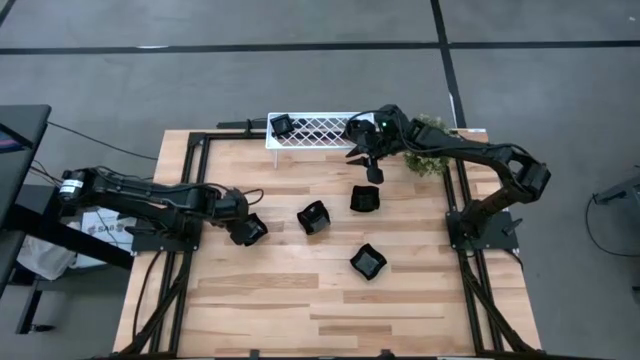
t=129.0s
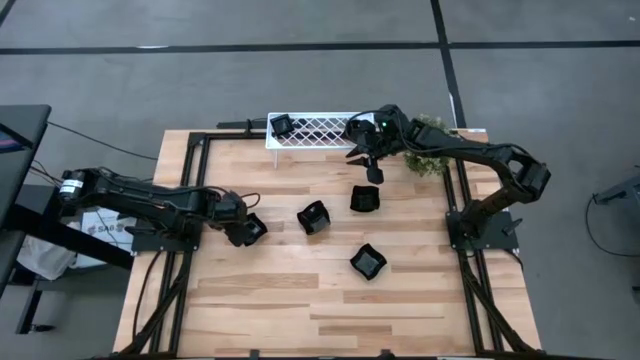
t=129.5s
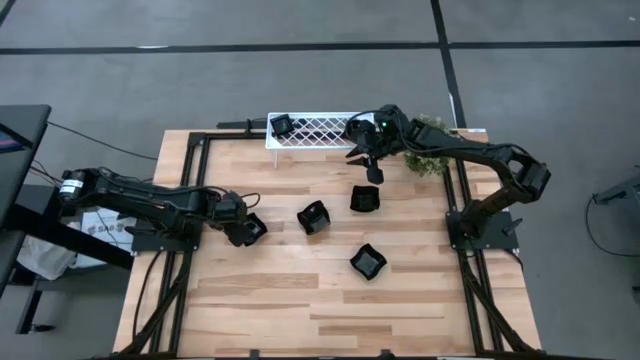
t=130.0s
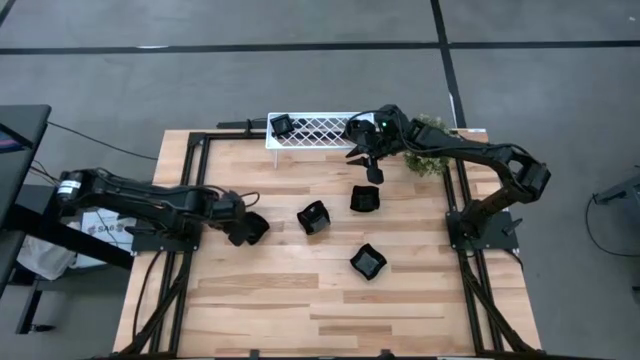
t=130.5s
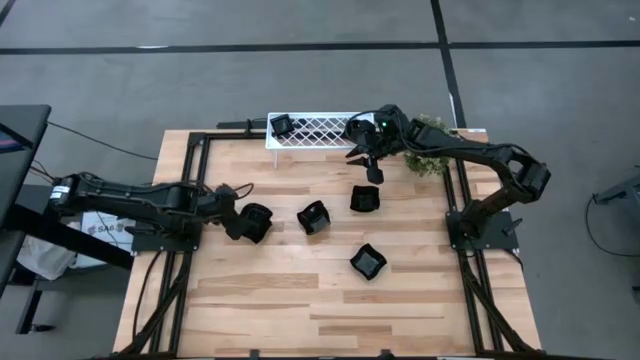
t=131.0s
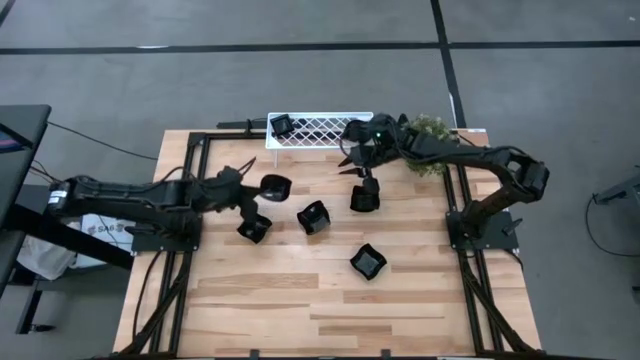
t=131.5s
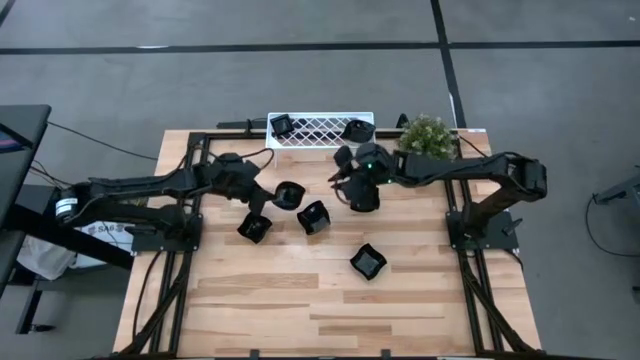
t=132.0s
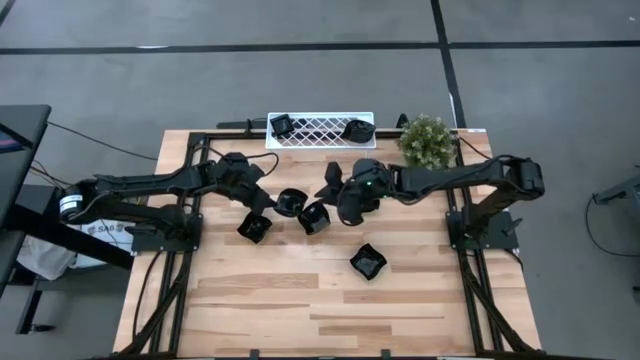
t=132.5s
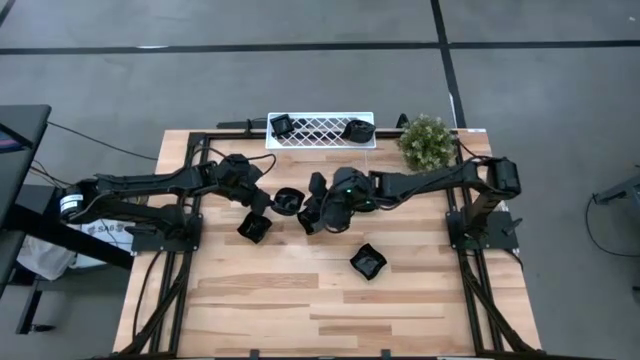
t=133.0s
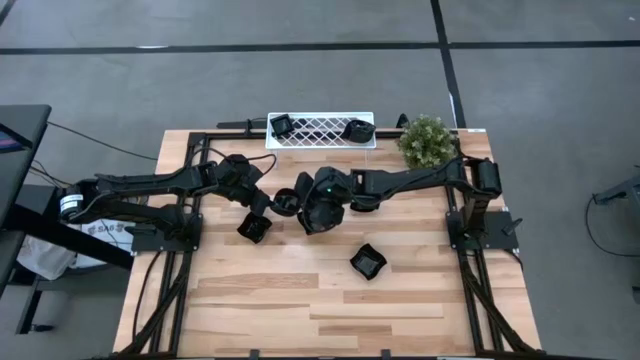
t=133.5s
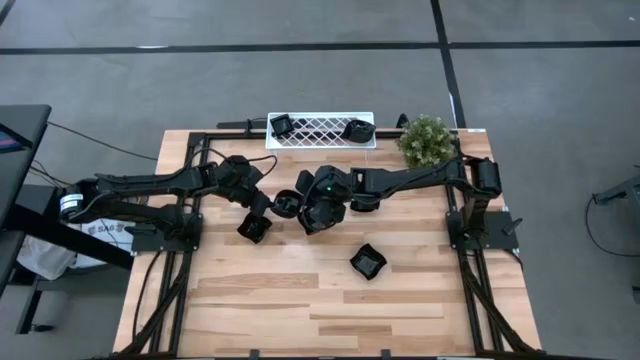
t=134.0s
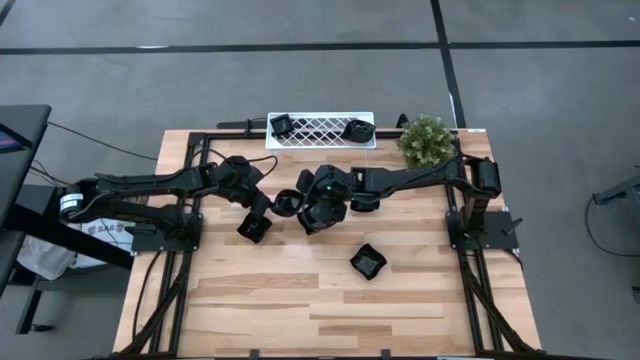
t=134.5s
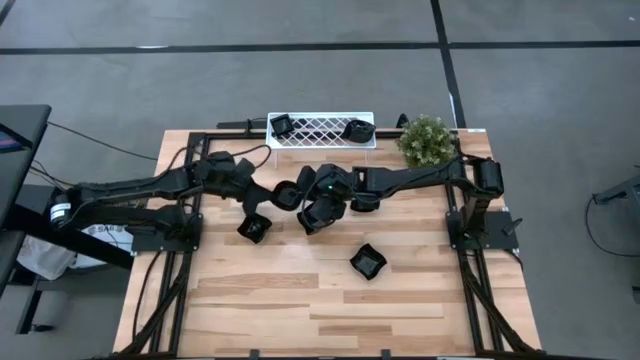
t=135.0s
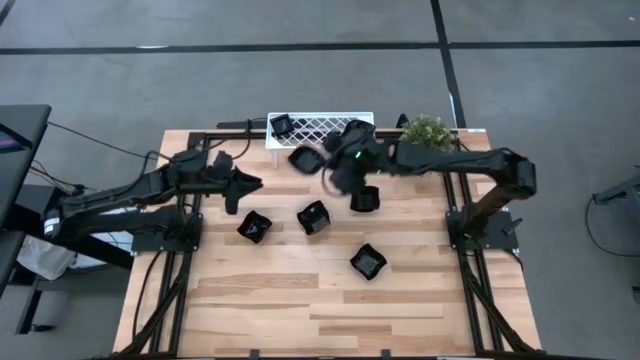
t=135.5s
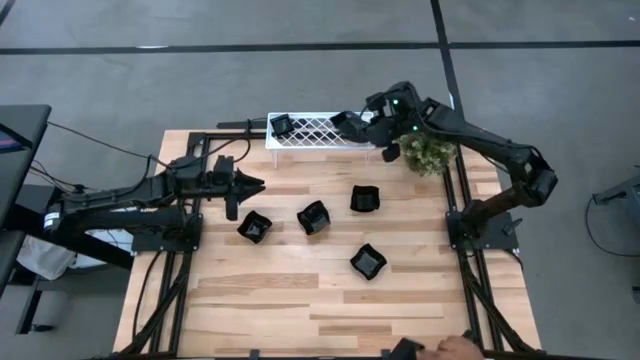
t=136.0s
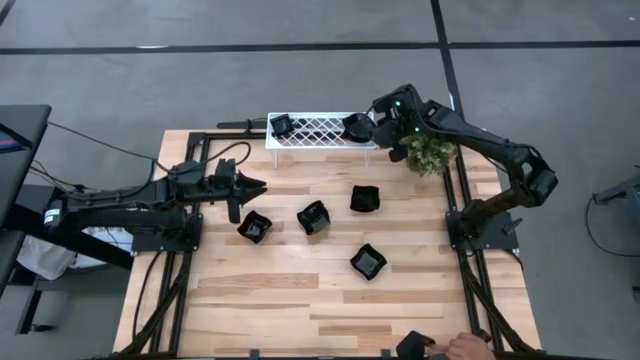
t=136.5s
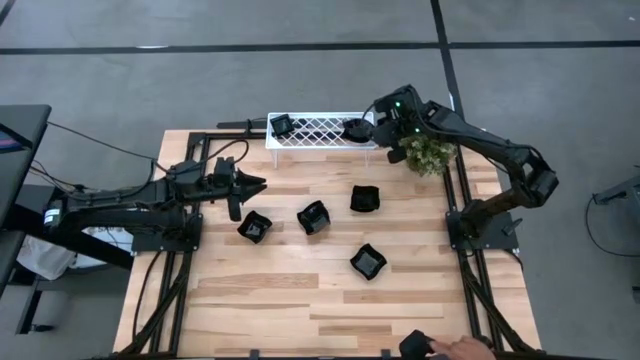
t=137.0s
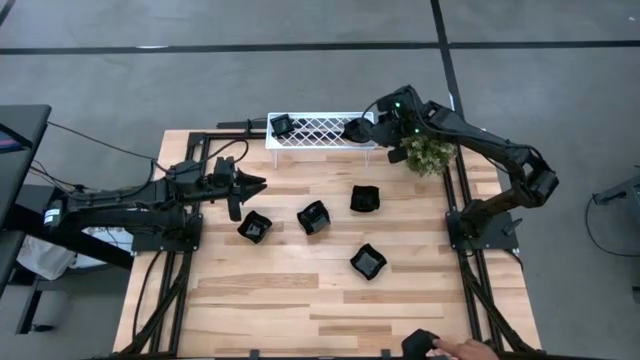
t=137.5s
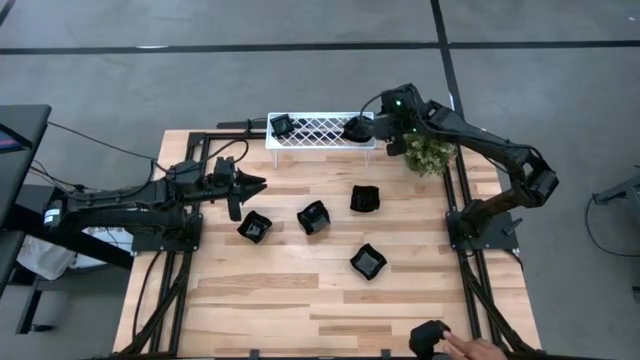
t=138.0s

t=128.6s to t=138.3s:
Task: Pick & Place Mini shaped plates
Stack the black leaf shaped plate on top of the black leaf shaped plate on the shelf

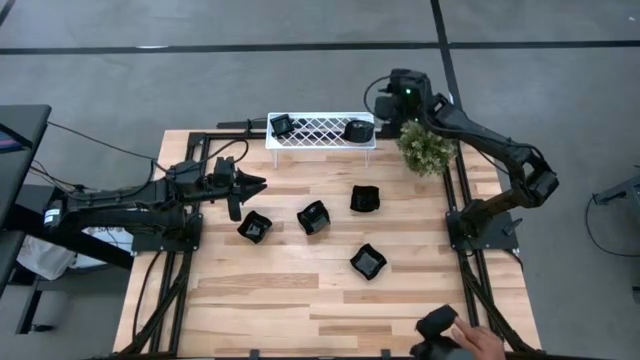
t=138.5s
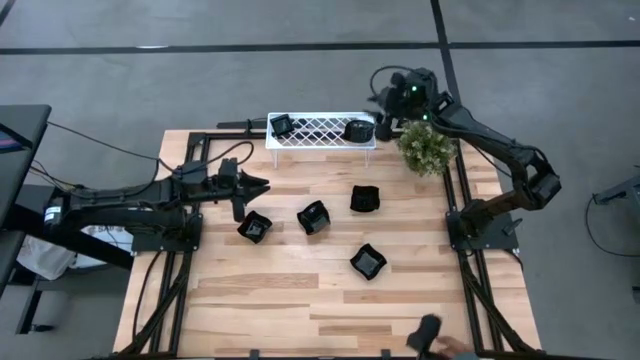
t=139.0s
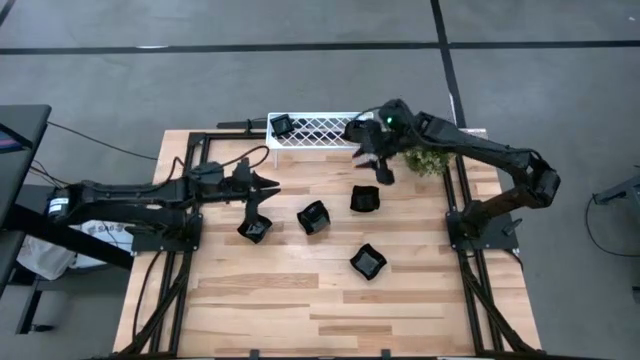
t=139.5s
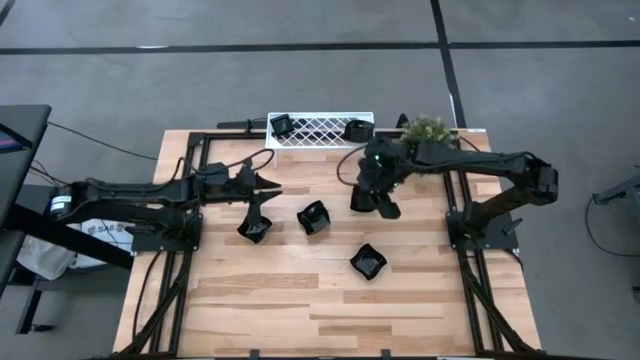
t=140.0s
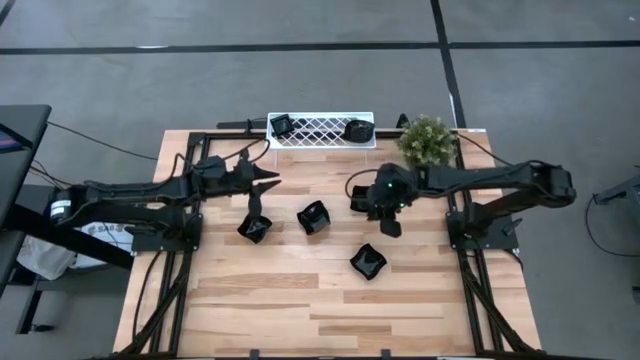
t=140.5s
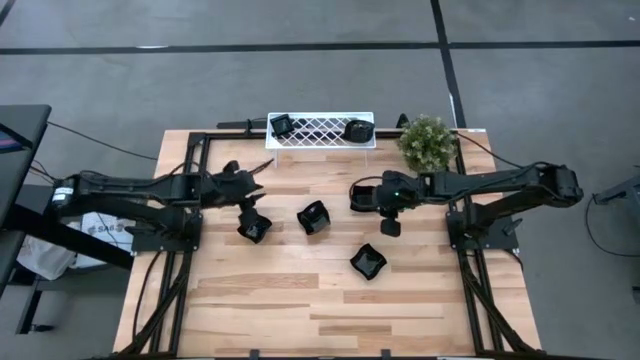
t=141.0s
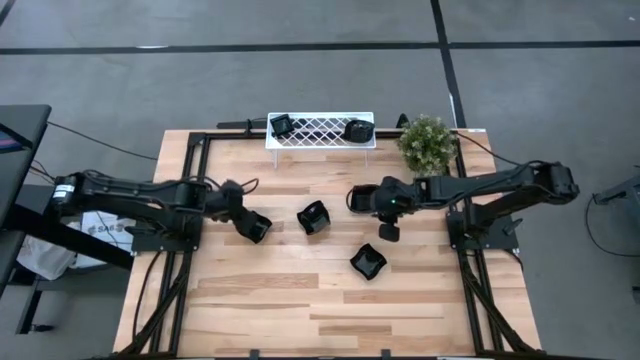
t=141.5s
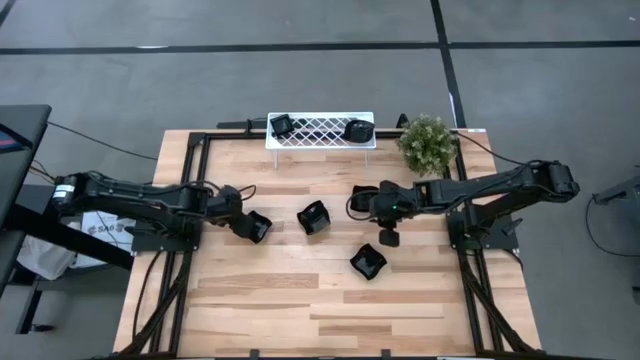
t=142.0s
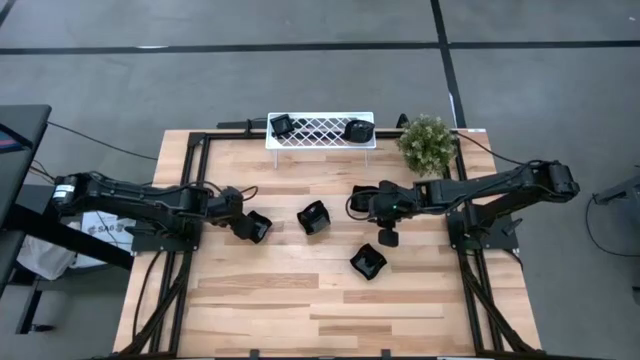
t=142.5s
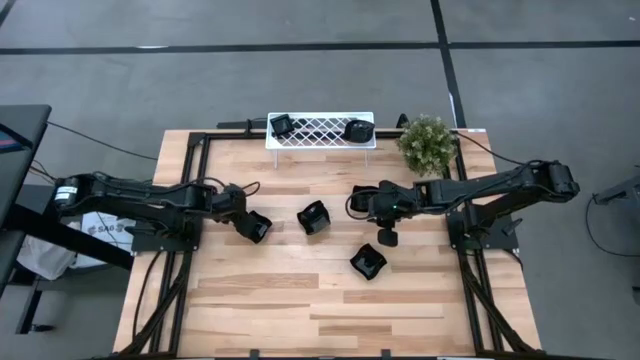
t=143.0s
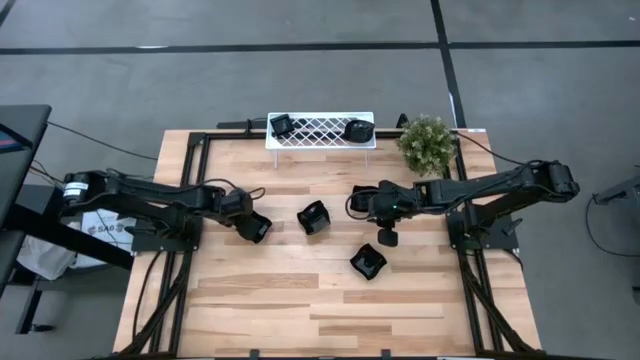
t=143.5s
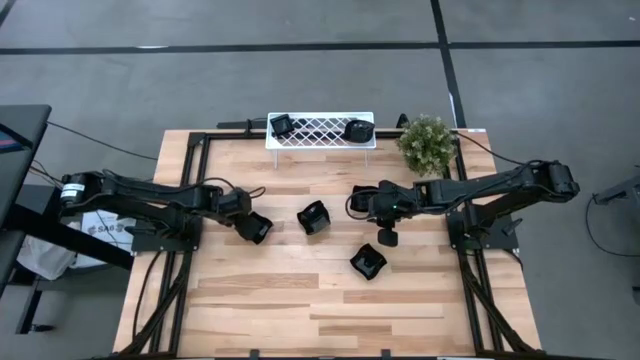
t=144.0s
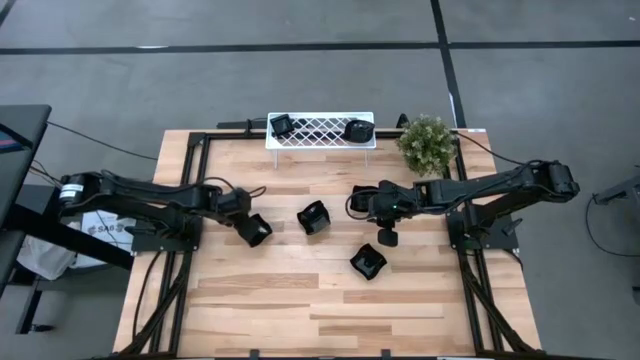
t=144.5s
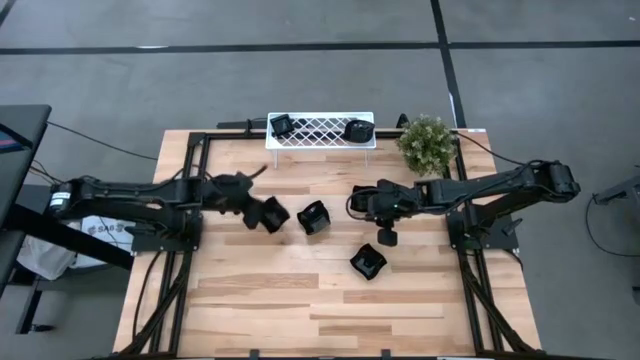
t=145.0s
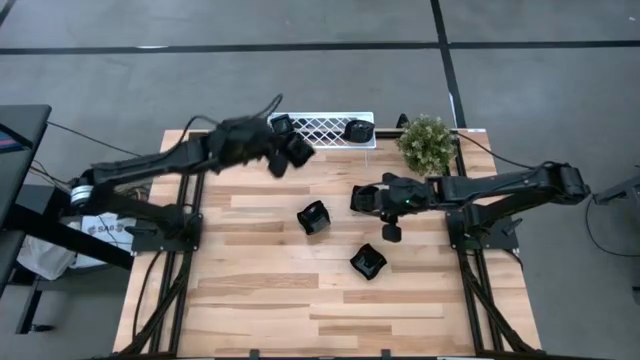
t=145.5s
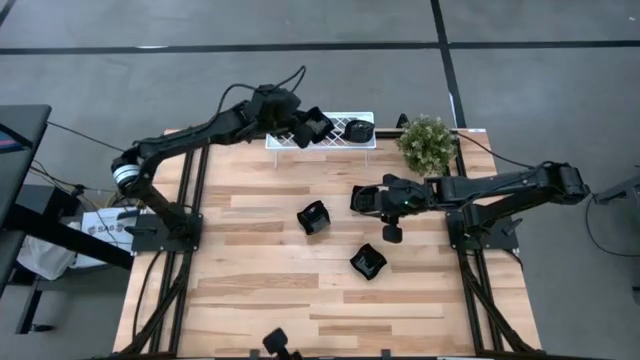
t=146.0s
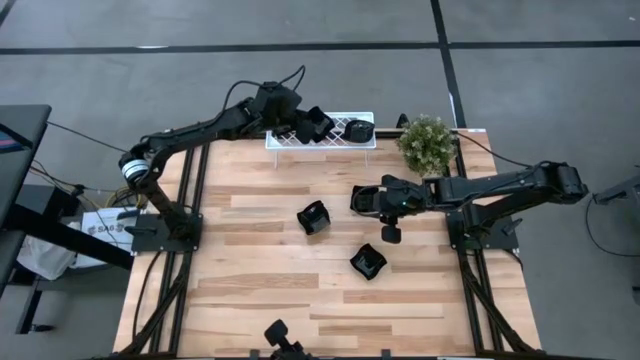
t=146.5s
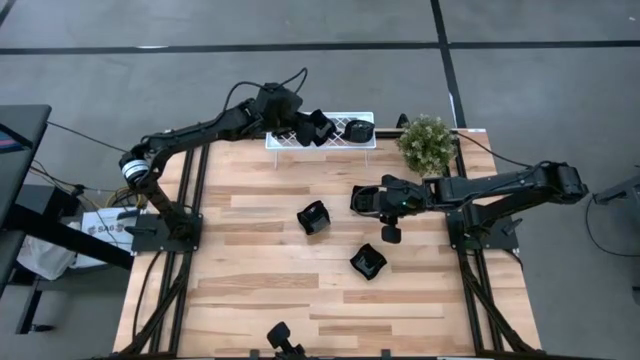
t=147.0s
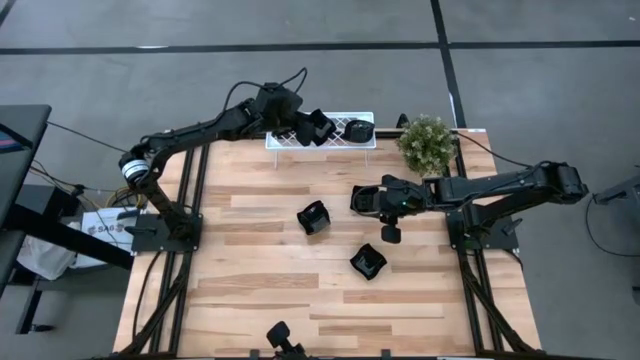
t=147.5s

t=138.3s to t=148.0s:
Put the black distorted square plate on the shelf

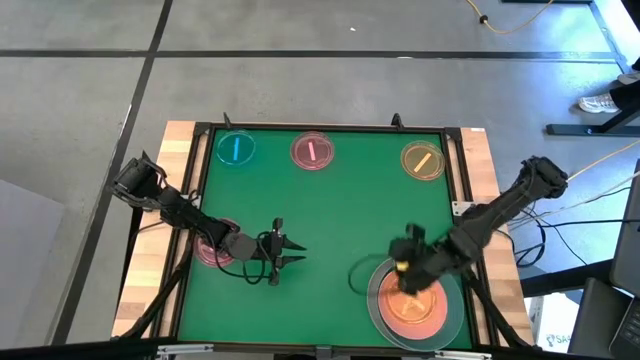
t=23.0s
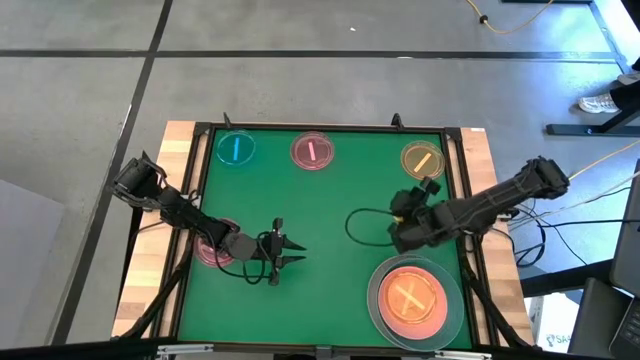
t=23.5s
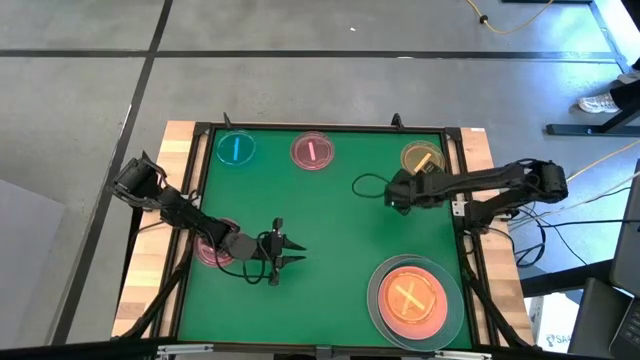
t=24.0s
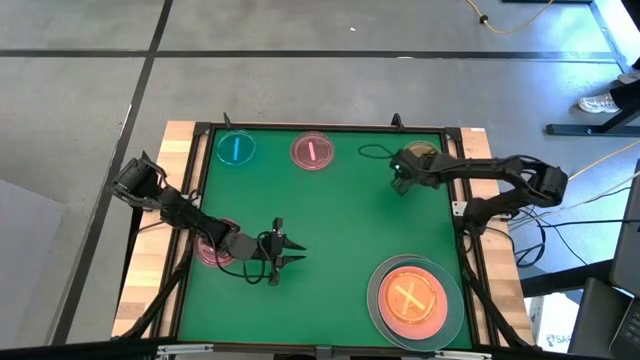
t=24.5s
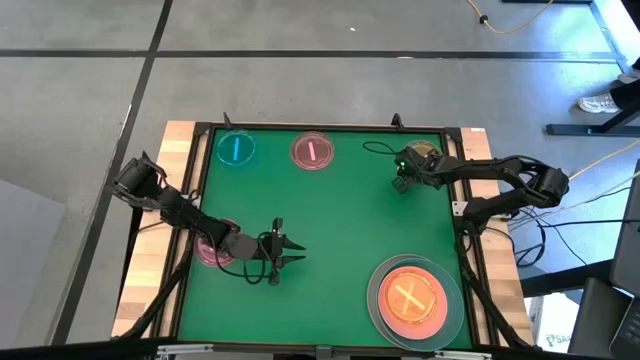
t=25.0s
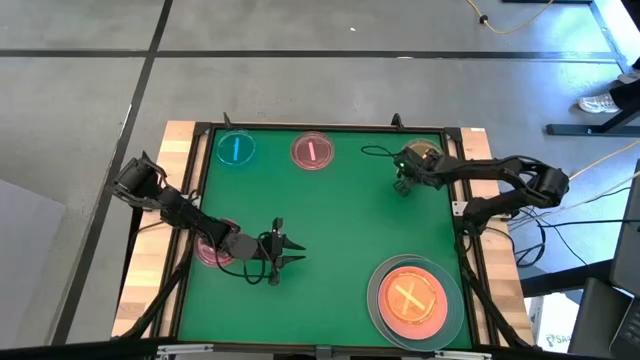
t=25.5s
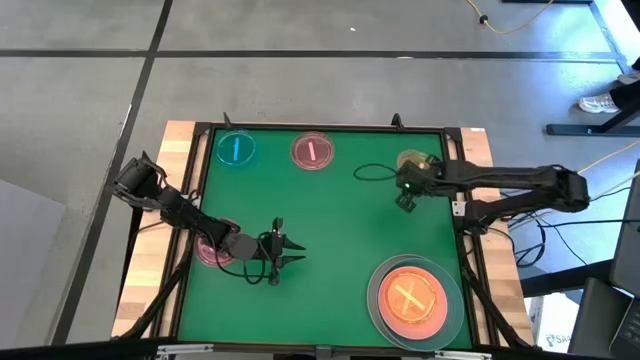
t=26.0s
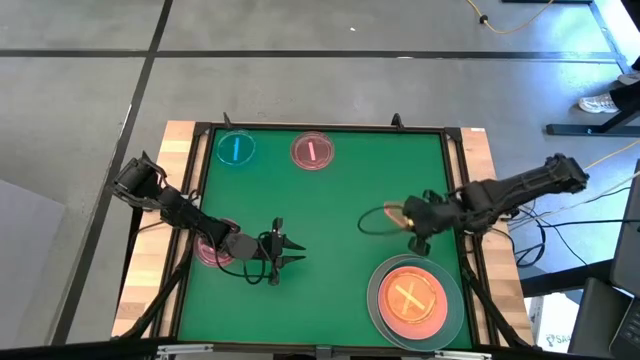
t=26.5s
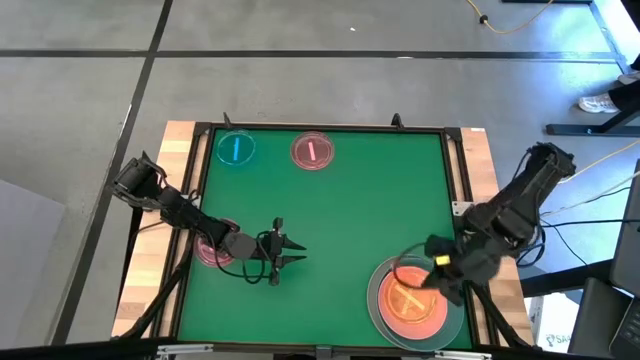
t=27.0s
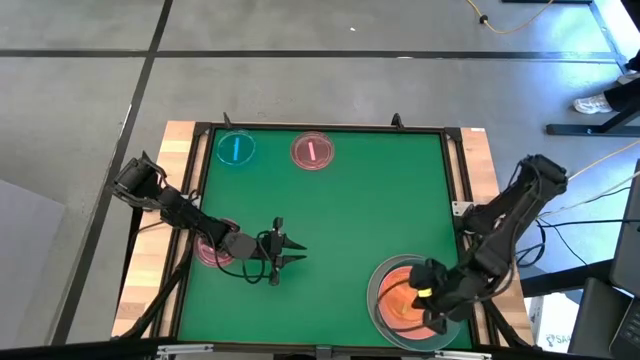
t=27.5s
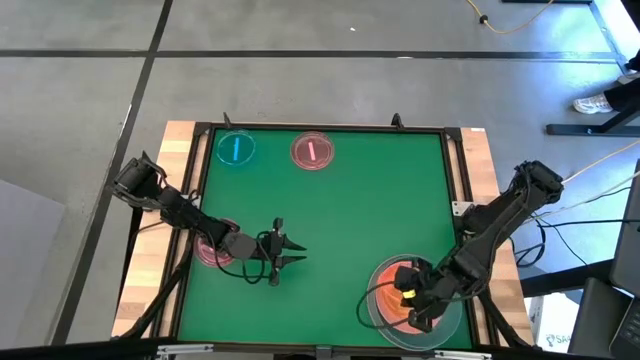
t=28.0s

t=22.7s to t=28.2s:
Task: Stack plastic plates
Stack the transparent orange plate on top of the transparent orange plate
